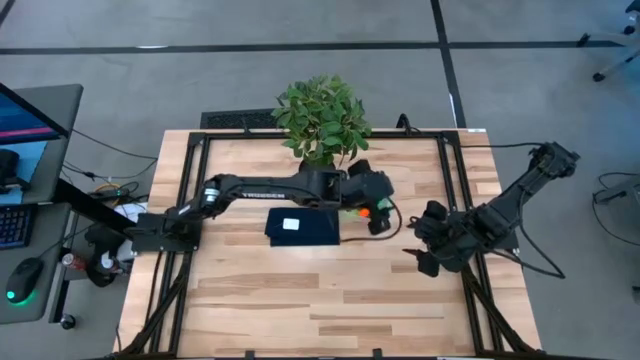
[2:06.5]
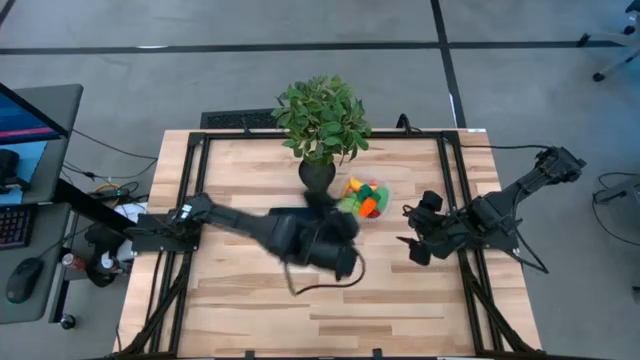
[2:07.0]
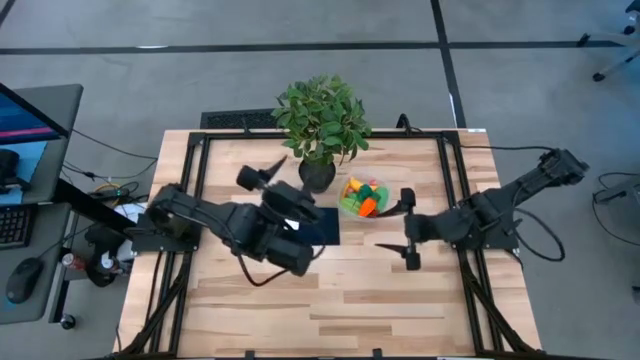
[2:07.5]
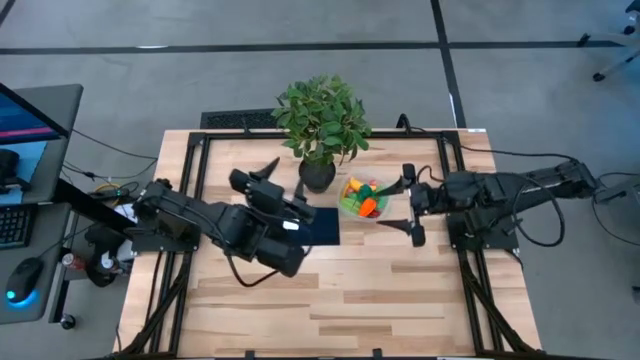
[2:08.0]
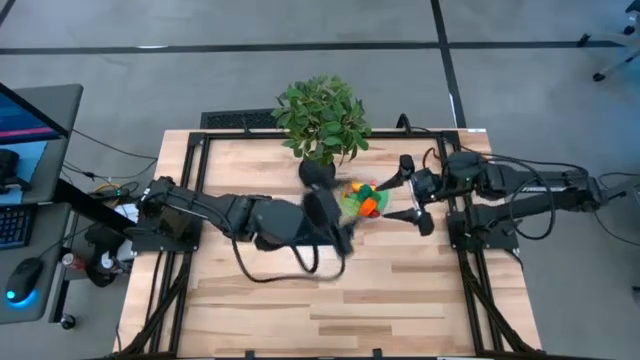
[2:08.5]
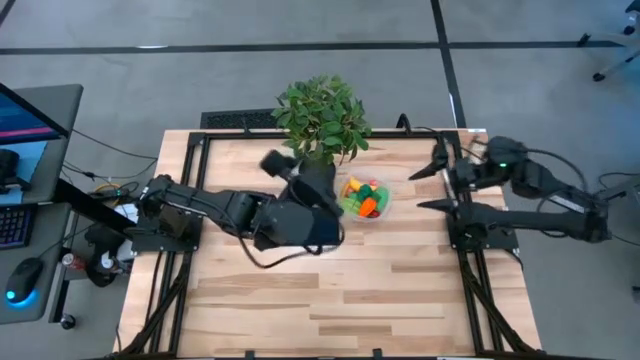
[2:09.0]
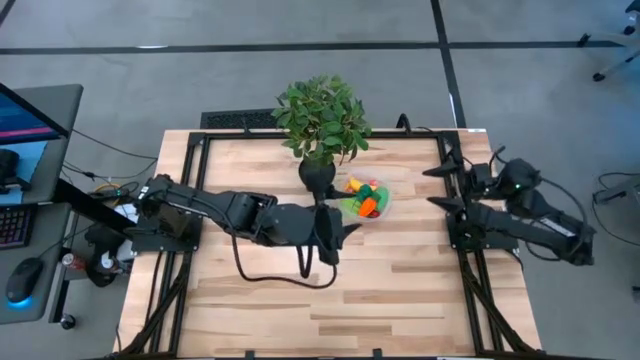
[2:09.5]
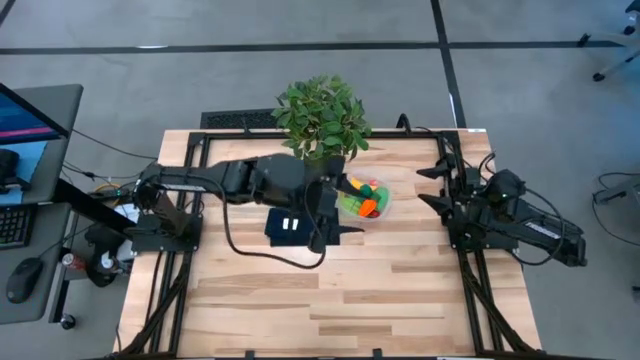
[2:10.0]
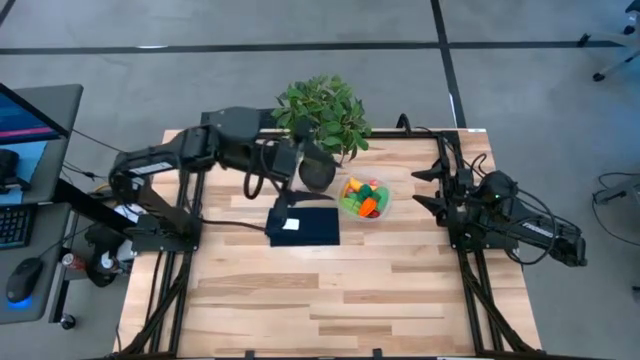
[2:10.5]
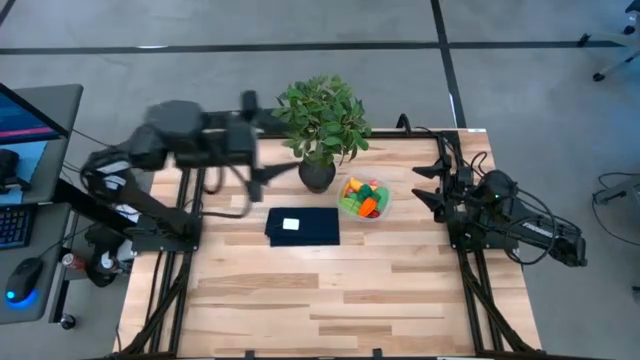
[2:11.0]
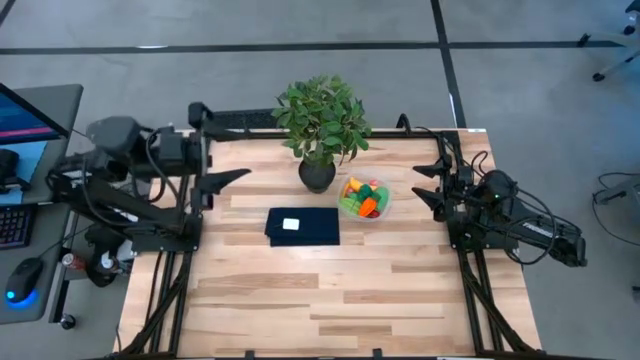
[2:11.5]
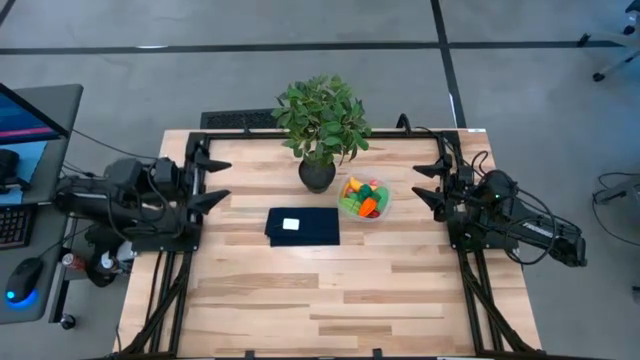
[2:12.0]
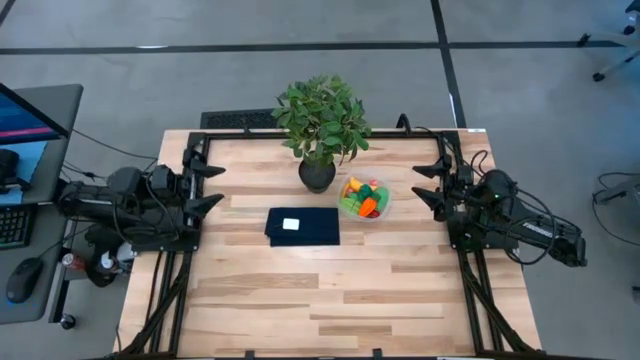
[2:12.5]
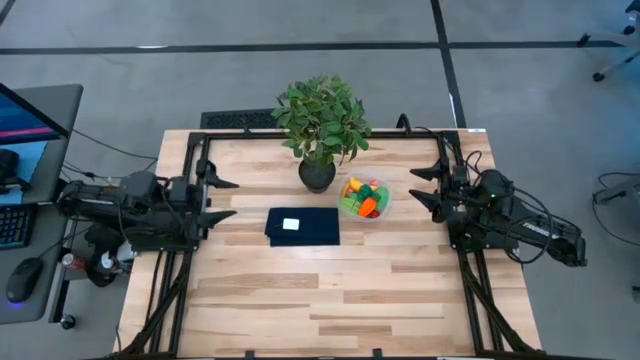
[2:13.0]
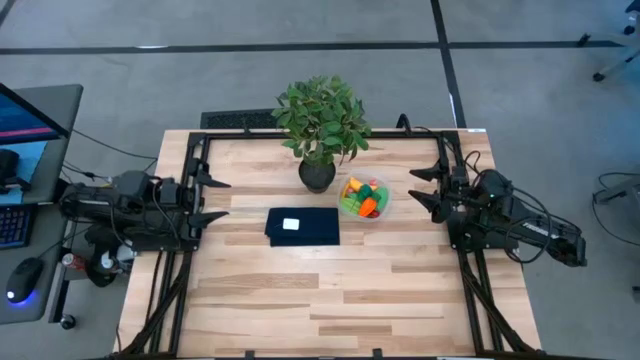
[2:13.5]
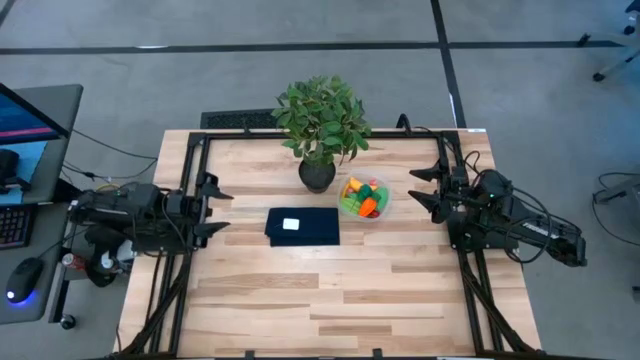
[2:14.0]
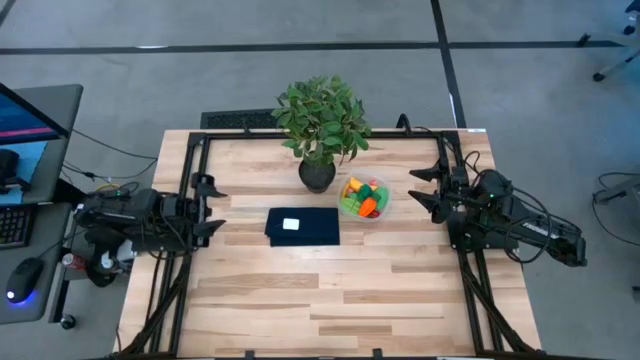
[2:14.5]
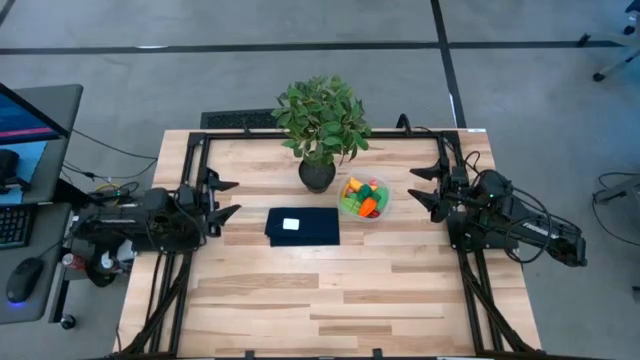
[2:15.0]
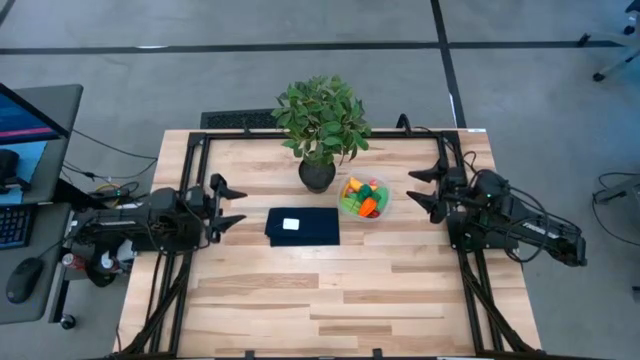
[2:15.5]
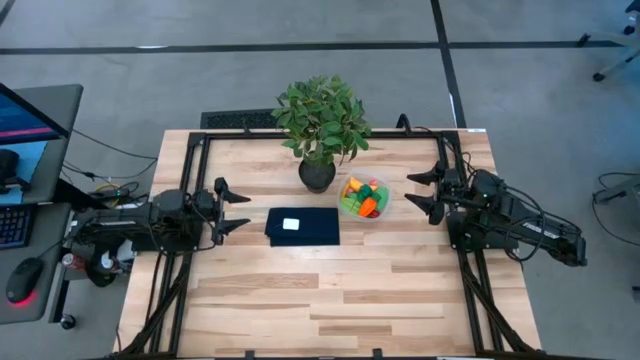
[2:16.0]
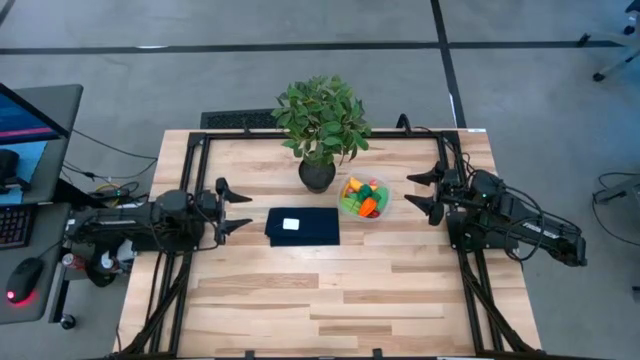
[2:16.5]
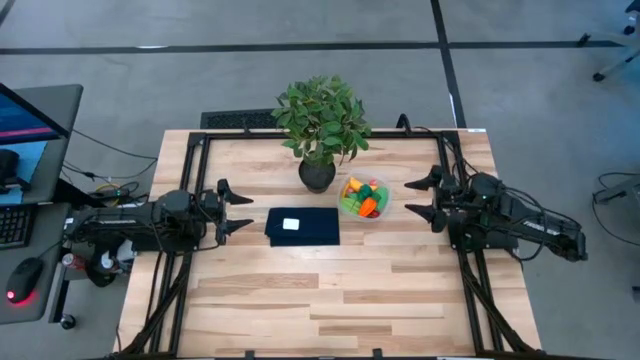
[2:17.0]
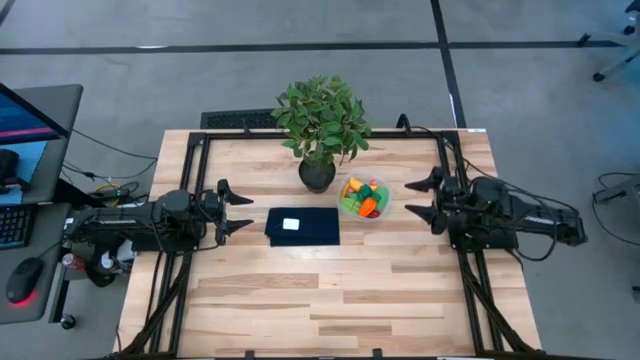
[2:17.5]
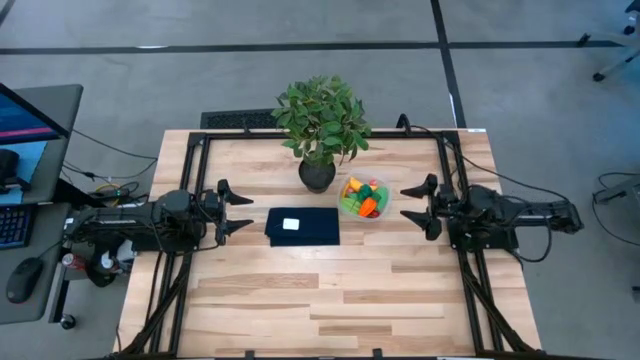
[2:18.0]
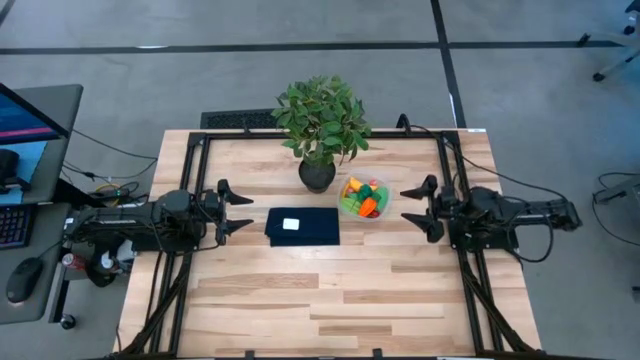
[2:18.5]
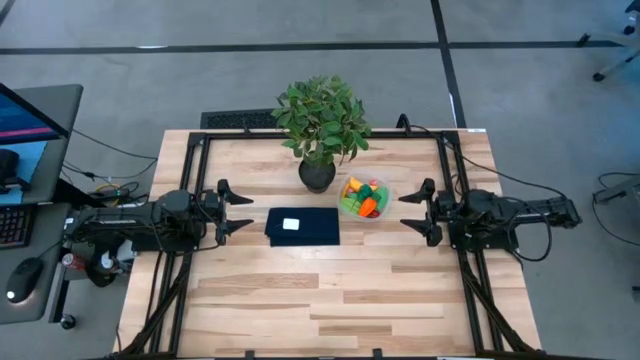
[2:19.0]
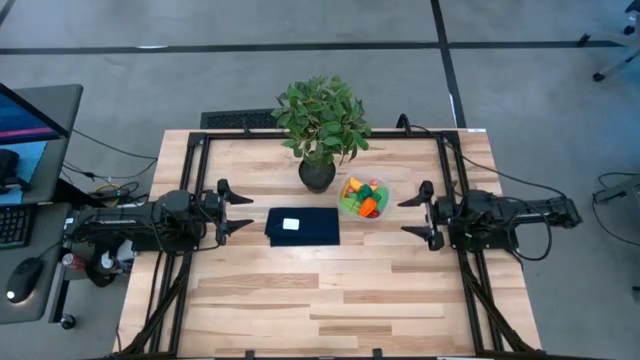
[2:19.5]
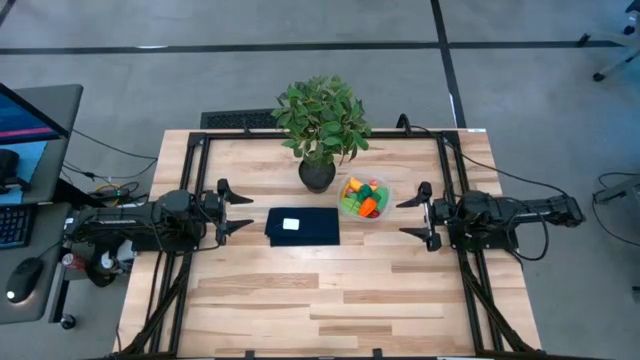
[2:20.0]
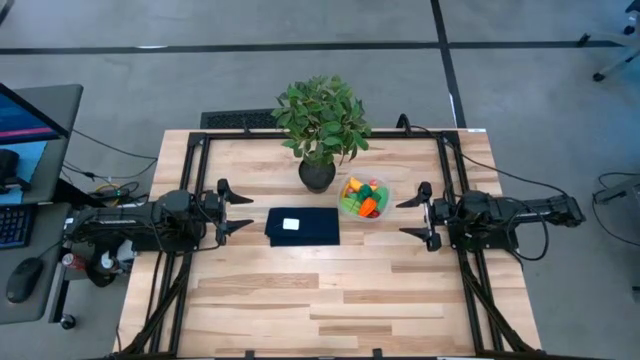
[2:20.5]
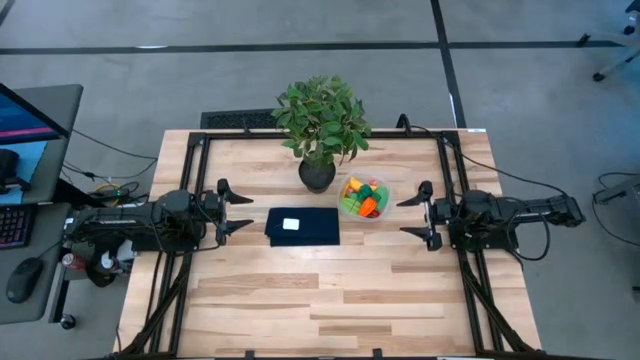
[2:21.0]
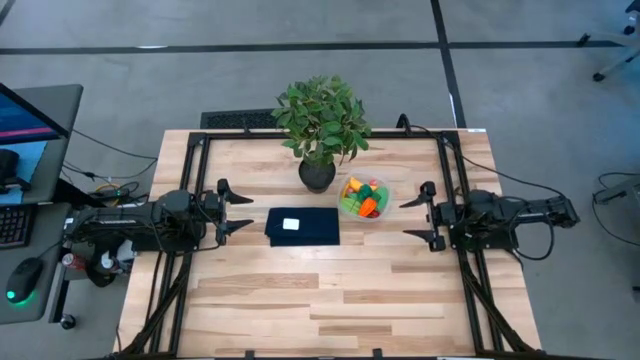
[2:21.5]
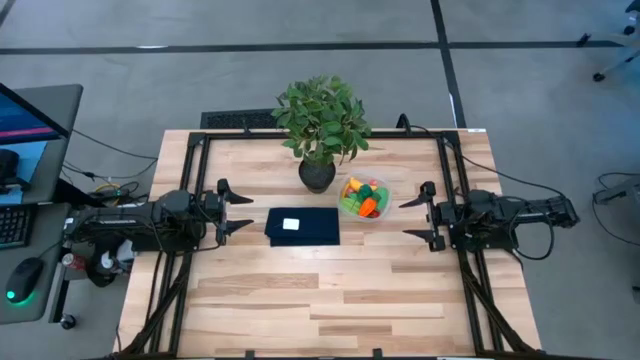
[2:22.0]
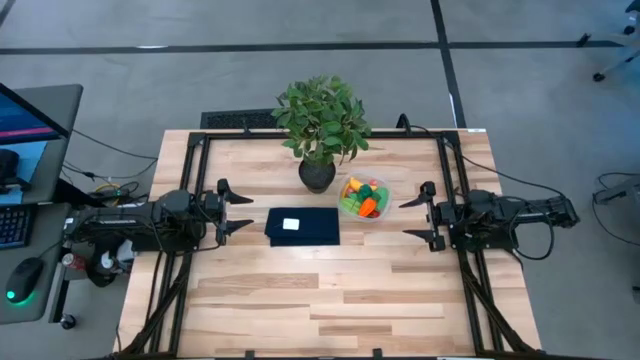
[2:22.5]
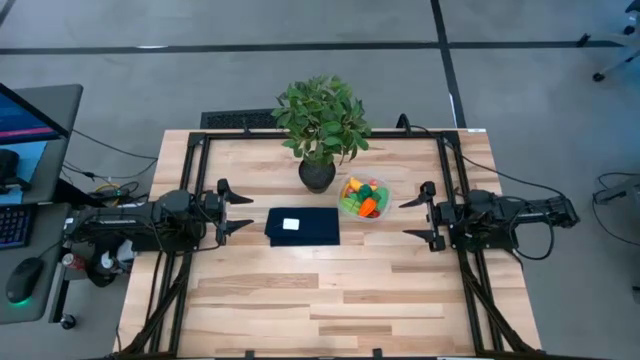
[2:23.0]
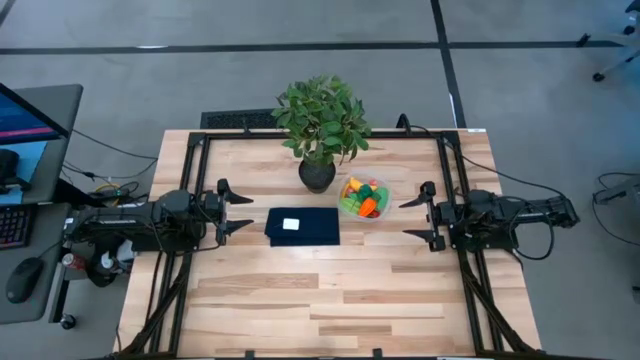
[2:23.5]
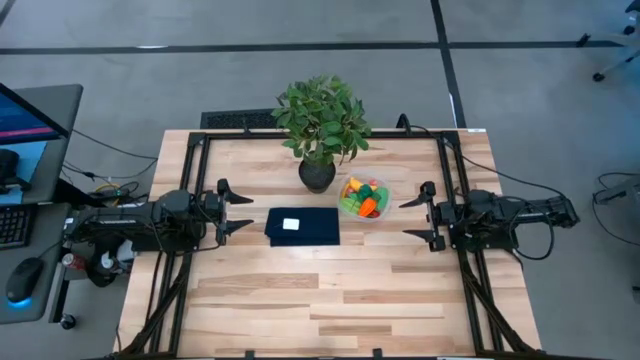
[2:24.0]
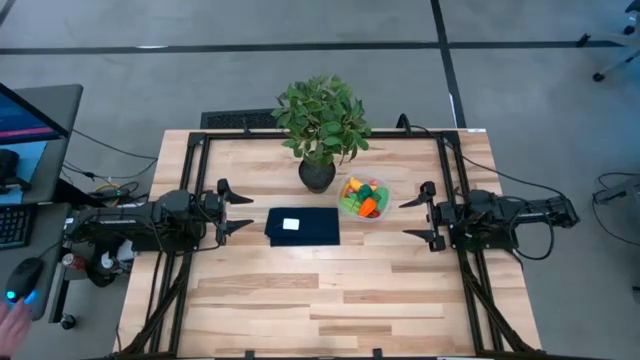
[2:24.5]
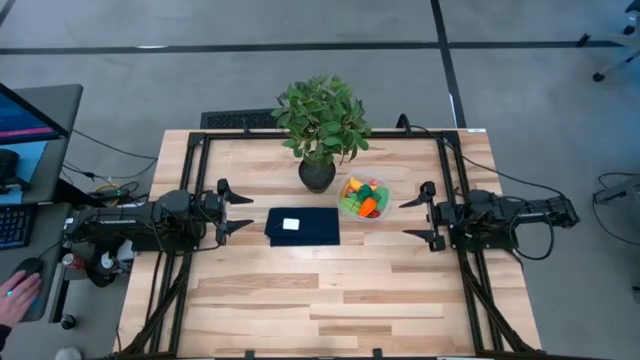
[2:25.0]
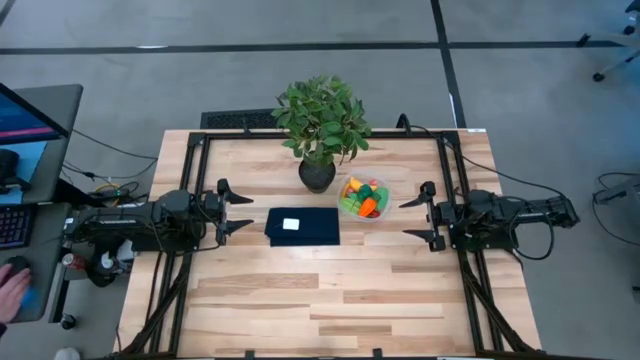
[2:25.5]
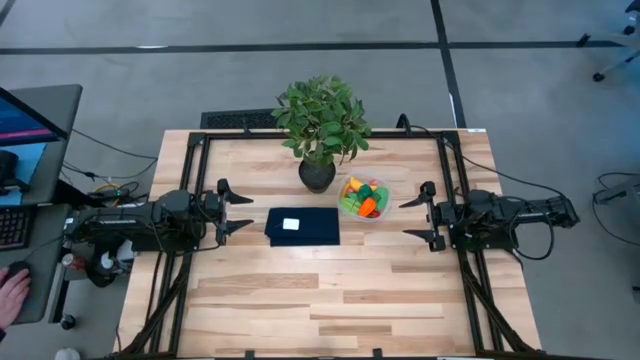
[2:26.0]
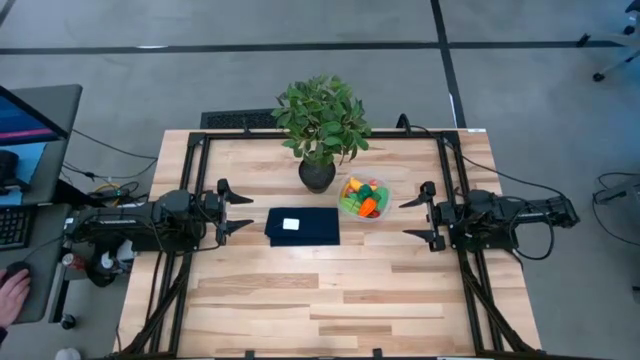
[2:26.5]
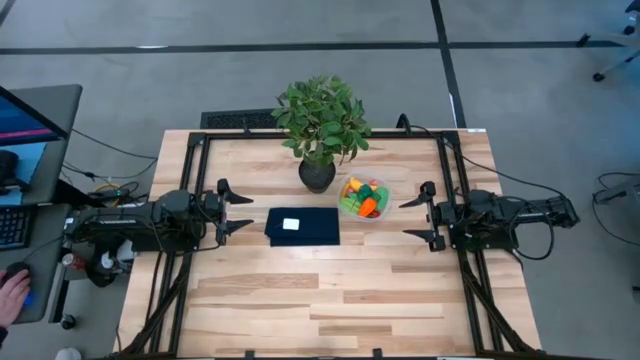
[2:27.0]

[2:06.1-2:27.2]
Task: Pick and placing Produce into tupperware
Return to Home Position
